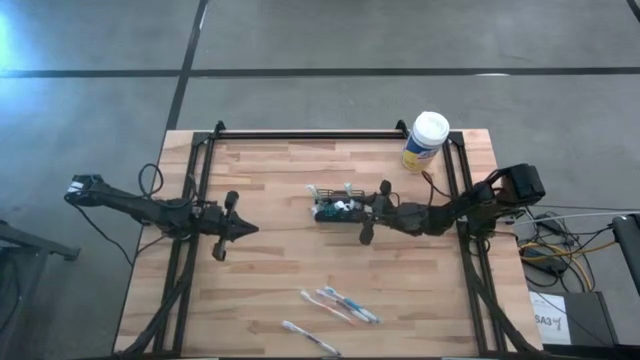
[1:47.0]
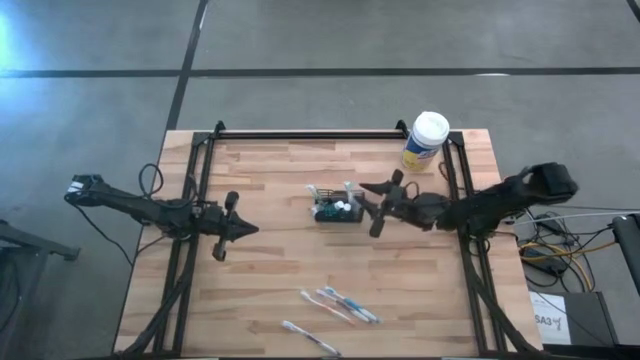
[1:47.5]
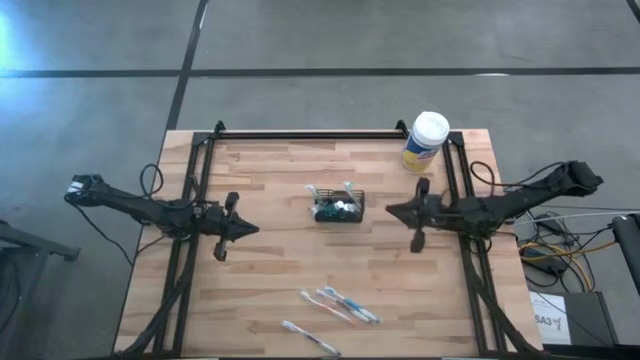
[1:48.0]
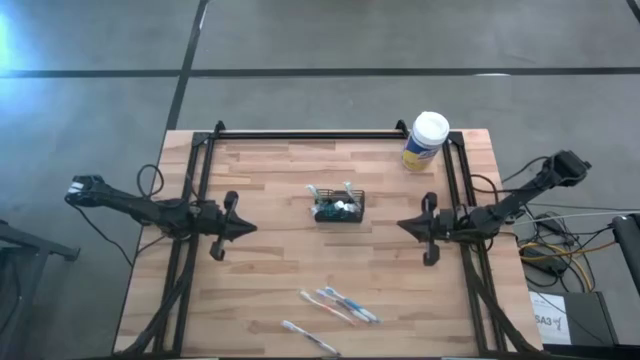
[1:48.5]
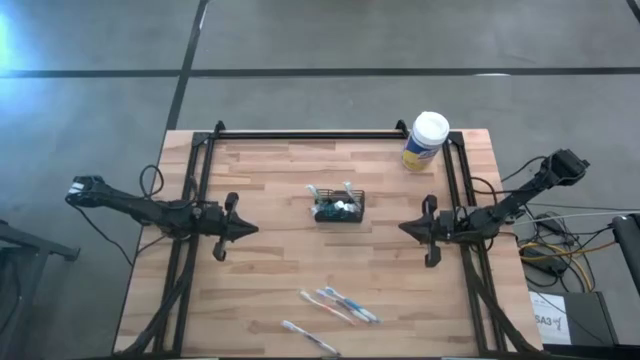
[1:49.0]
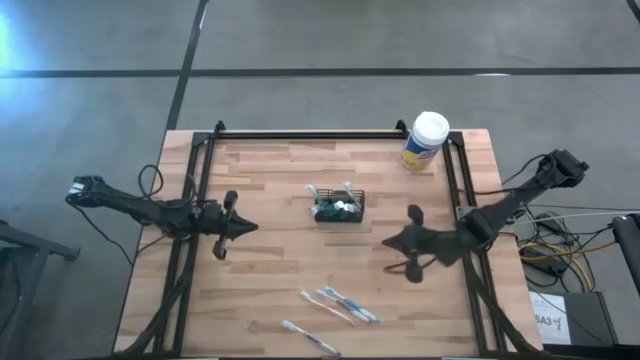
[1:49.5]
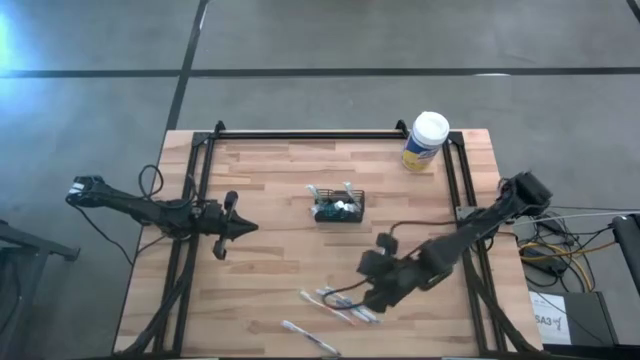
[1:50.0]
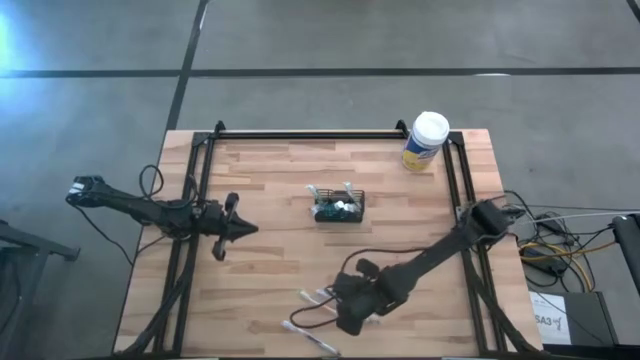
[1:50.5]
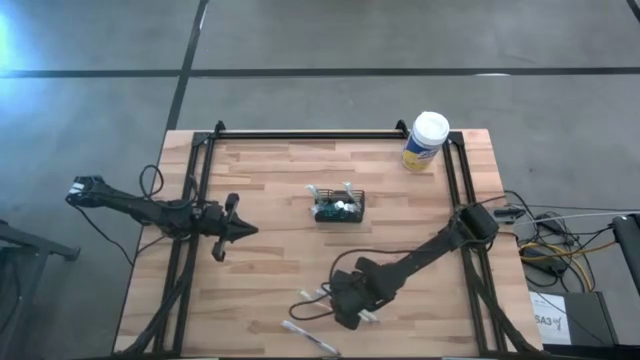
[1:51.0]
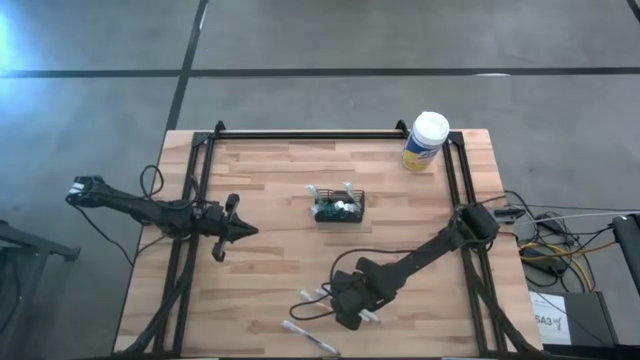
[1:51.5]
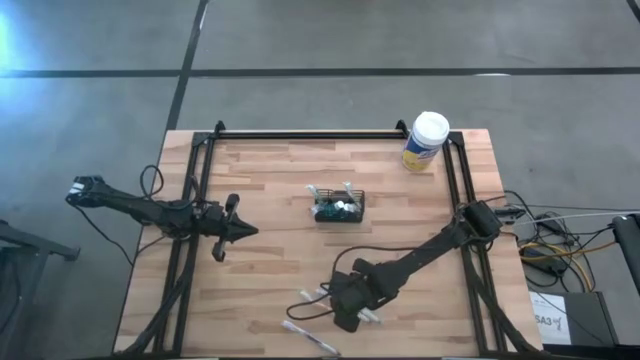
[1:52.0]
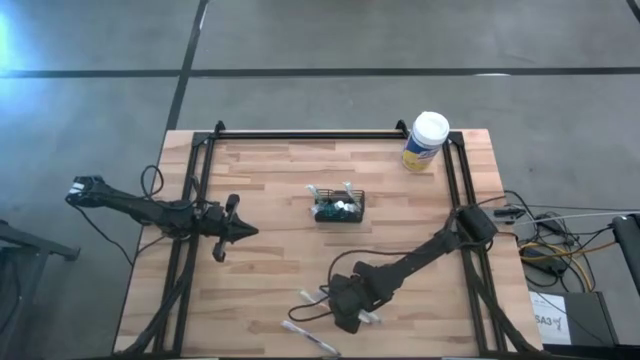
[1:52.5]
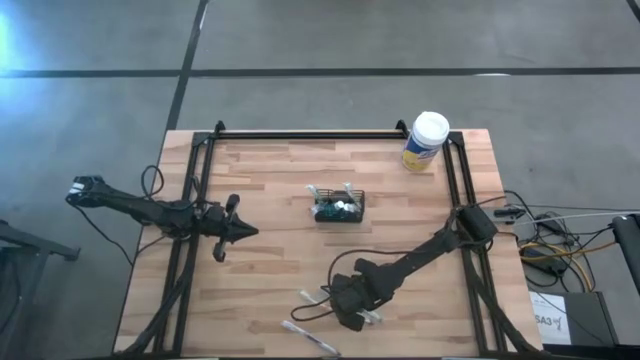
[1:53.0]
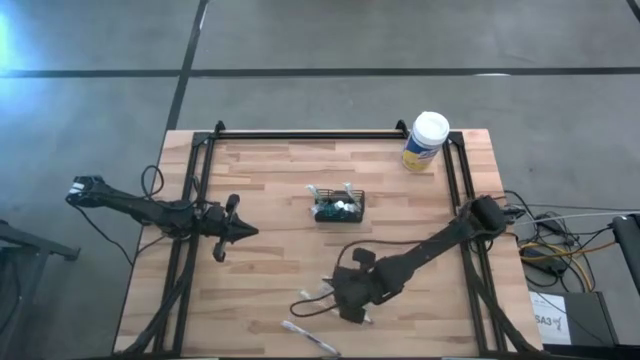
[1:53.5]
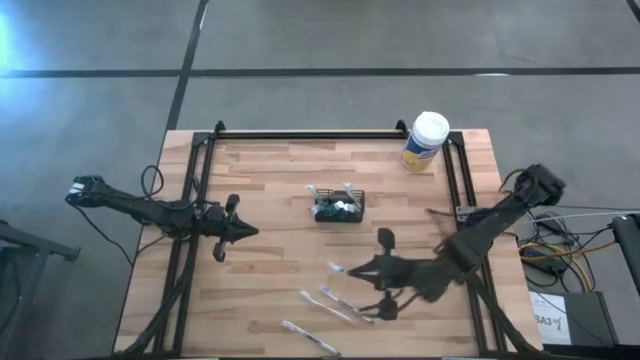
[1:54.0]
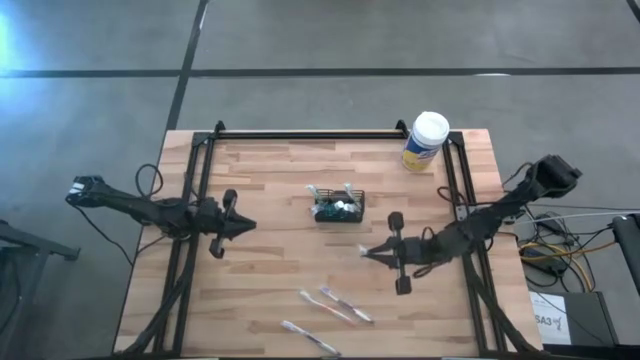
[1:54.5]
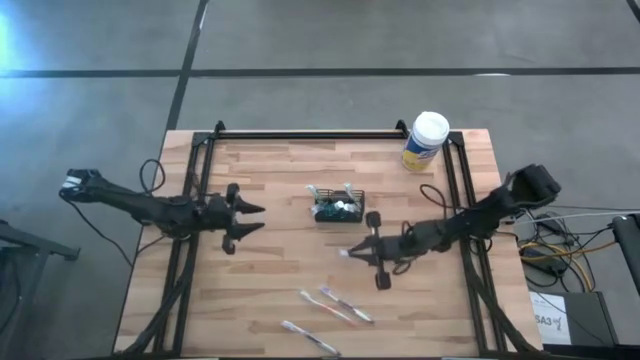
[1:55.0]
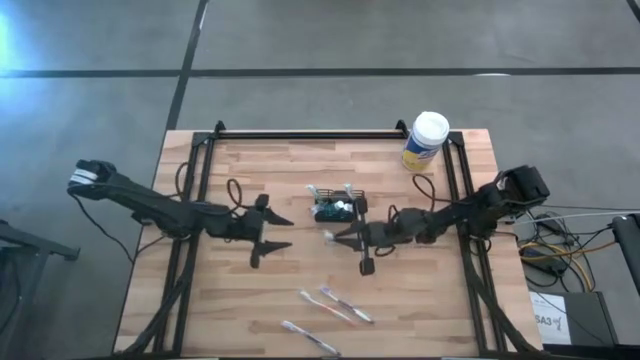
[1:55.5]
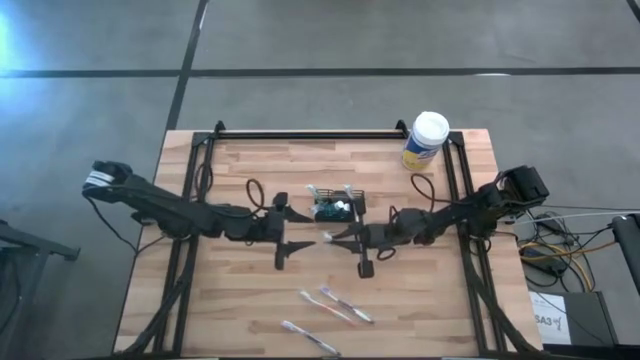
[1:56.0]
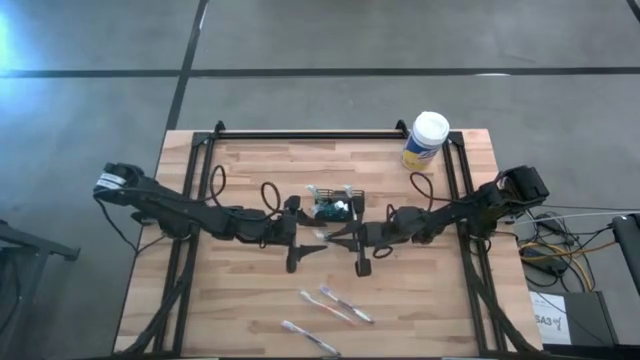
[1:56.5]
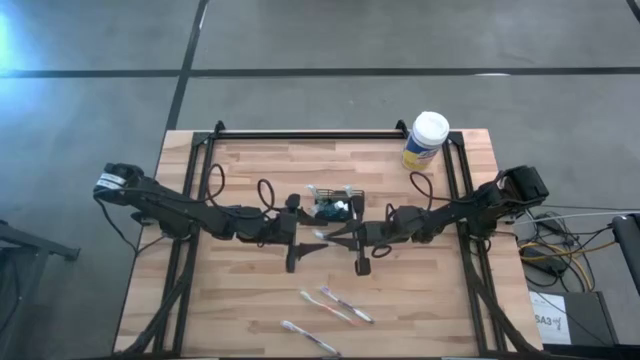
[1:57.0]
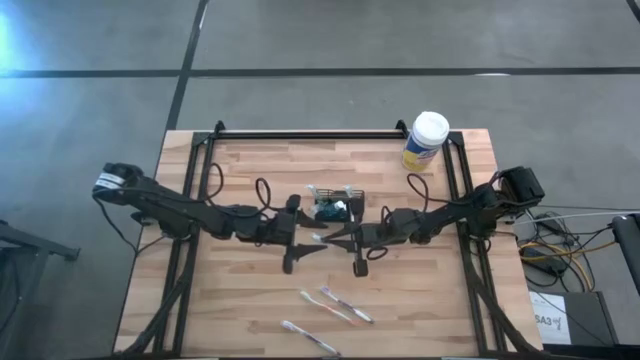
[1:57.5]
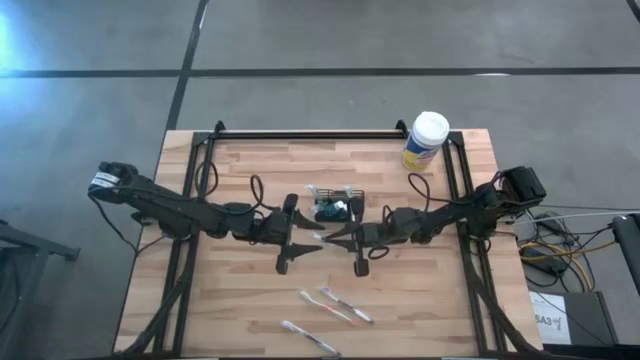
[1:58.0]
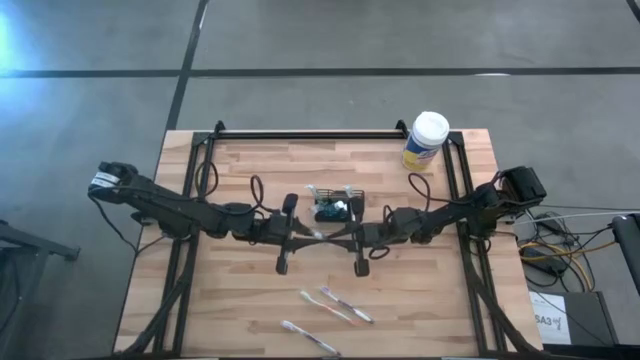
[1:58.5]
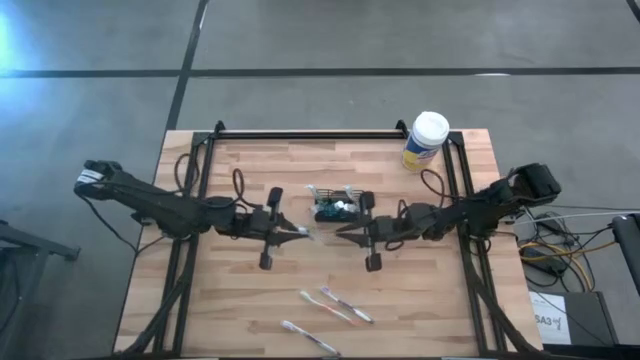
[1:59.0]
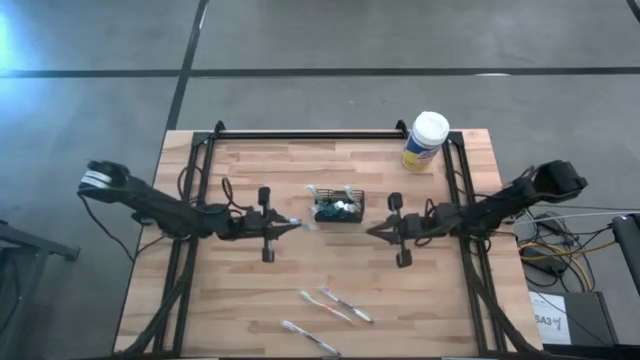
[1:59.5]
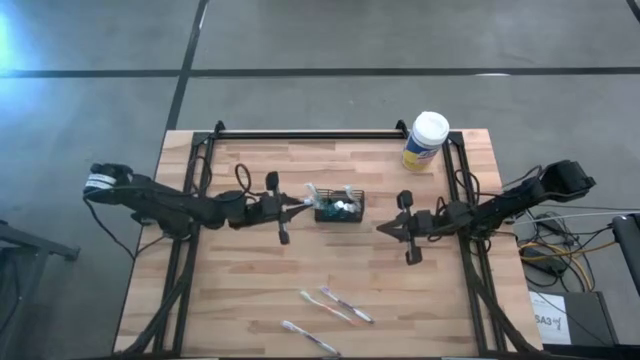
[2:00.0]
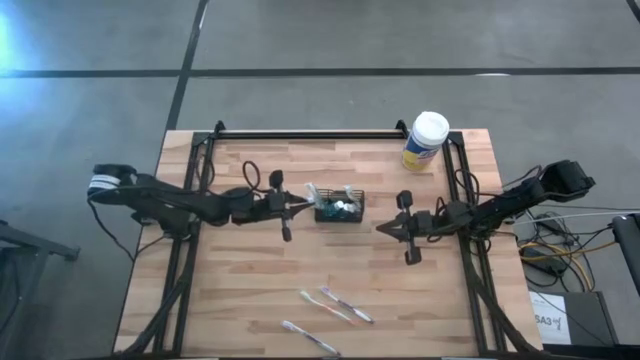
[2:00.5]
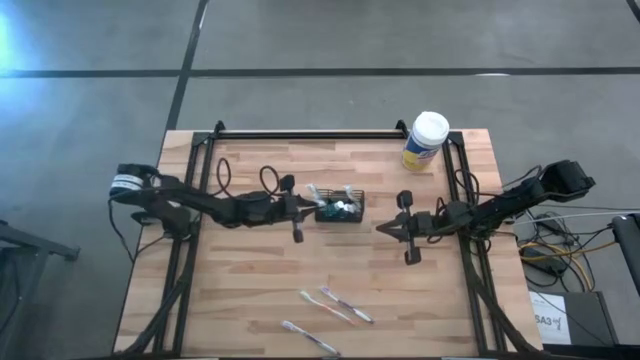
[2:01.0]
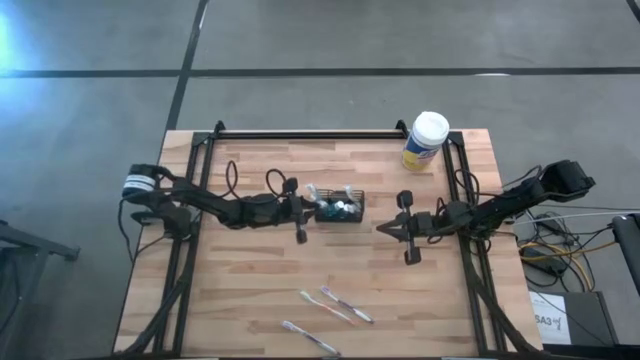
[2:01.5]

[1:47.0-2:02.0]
Task: Pick & Place toothbrushing station
Put the blue toothbrush into the black wire organizer

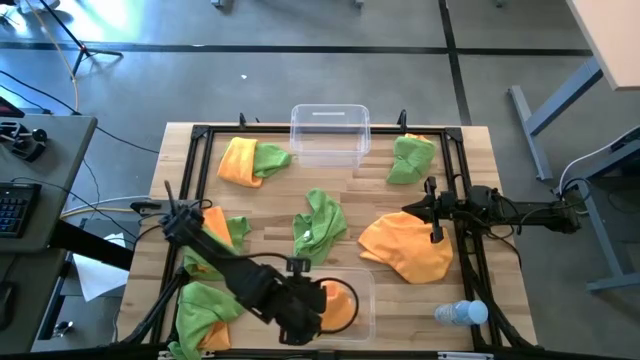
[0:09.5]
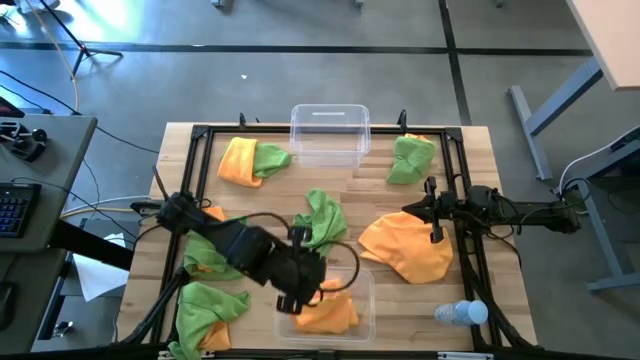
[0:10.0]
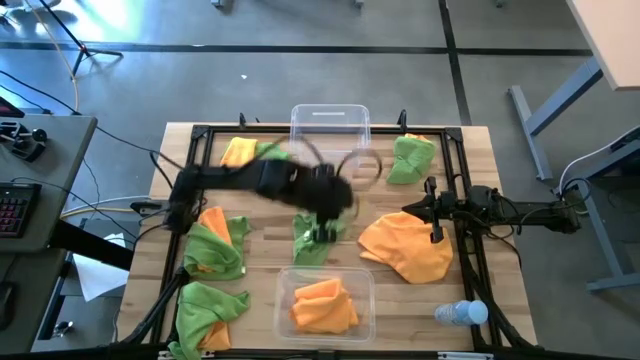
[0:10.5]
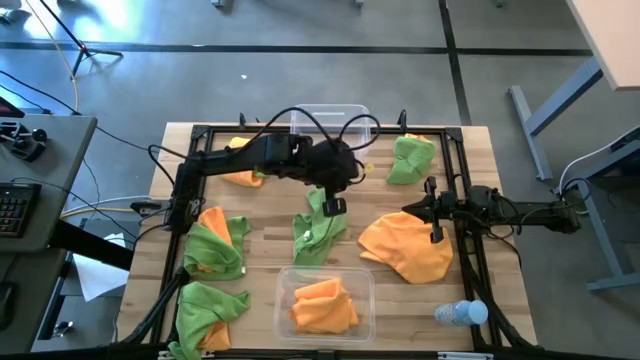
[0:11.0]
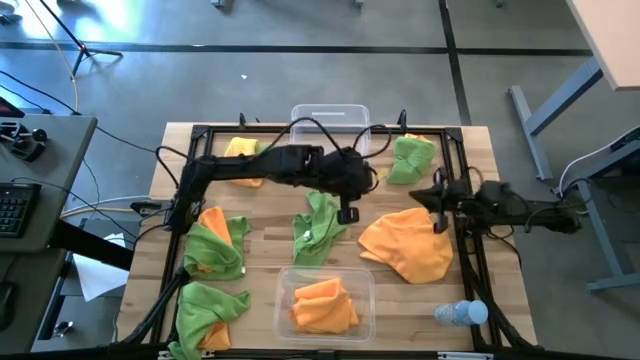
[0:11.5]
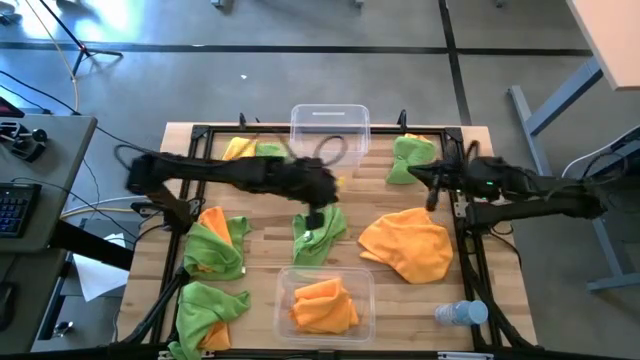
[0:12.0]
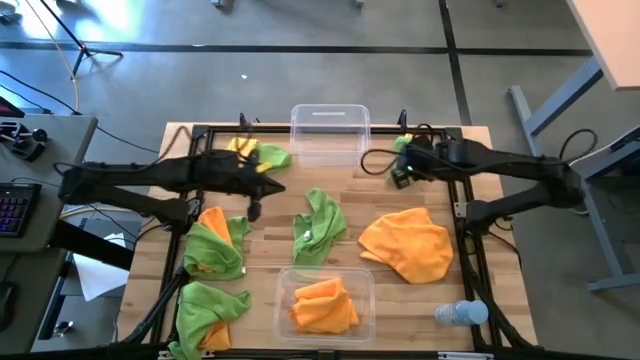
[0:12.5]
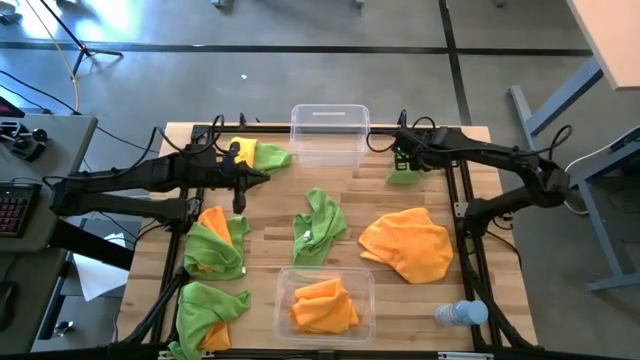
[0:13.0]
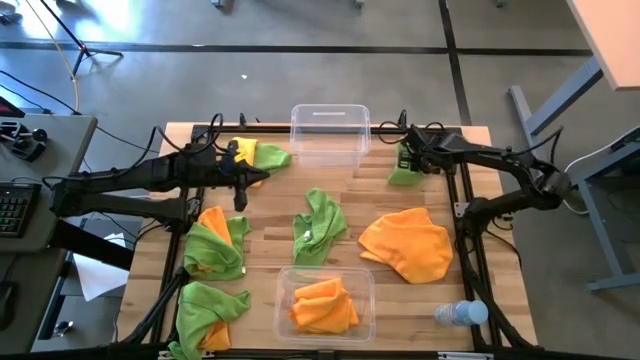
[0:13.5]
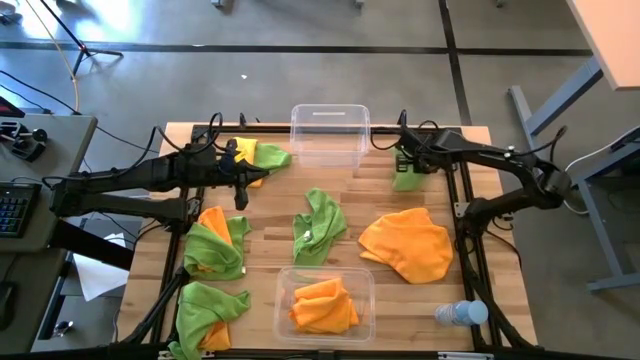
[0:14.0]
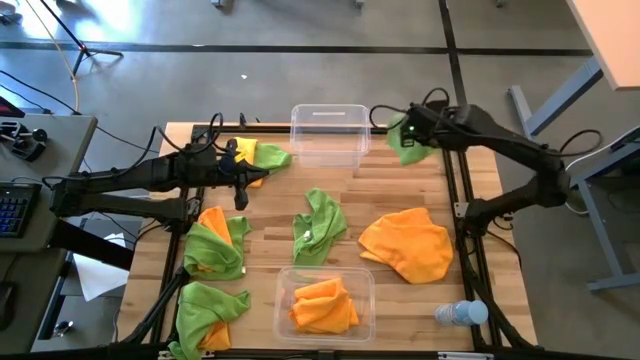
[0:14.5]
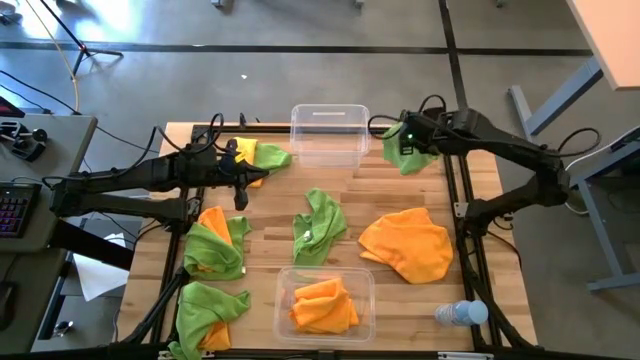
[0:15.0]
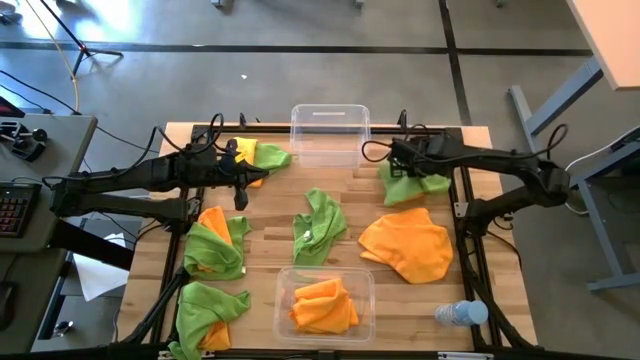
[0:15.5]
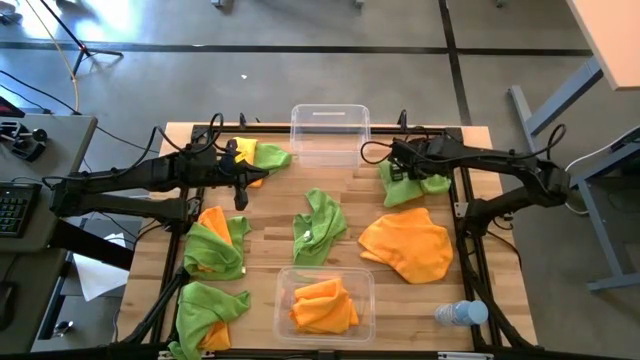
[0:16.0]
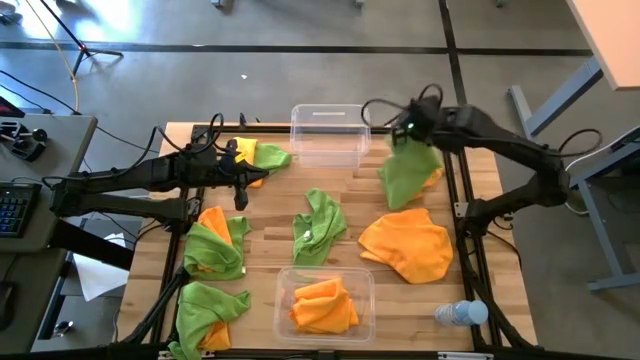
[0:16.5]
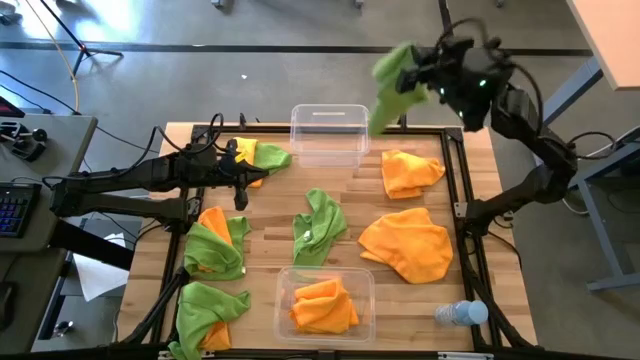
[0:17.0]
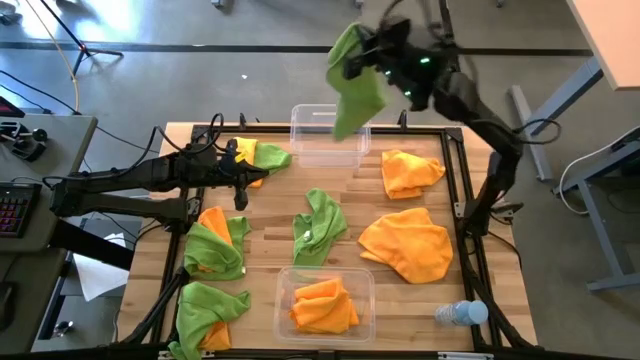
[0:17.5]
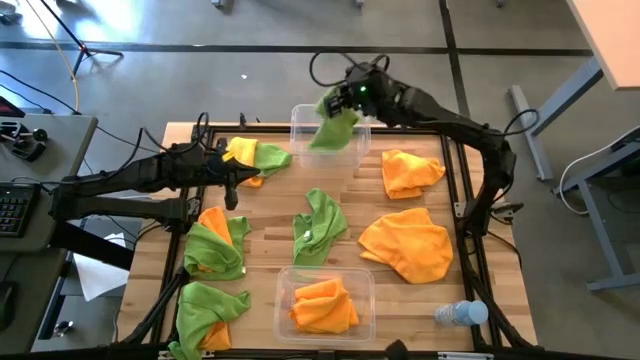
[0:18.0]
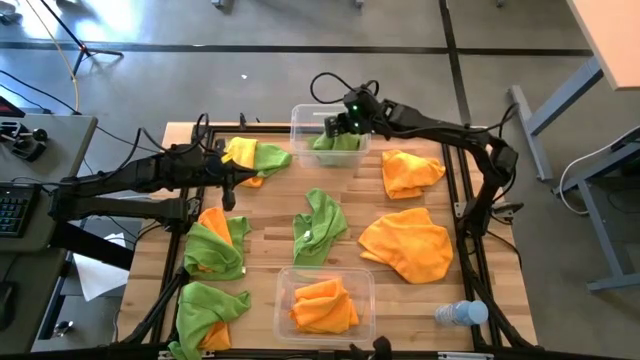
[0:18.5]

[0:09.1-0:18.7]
Task: Sort microfiber towel by color & place in baskets
Put the green towel into the top transparent bin
